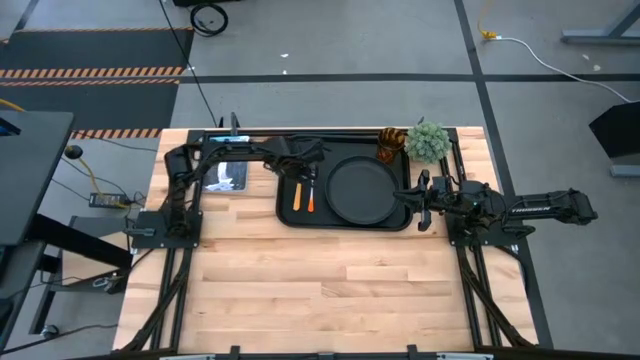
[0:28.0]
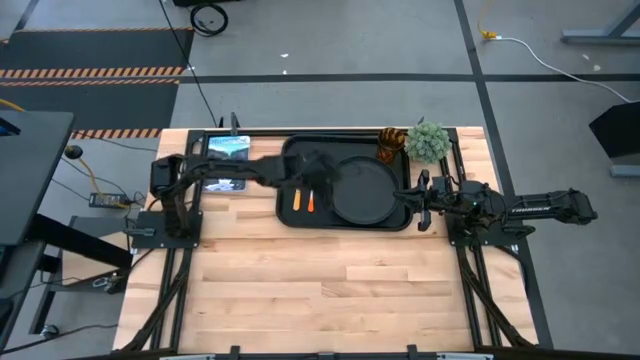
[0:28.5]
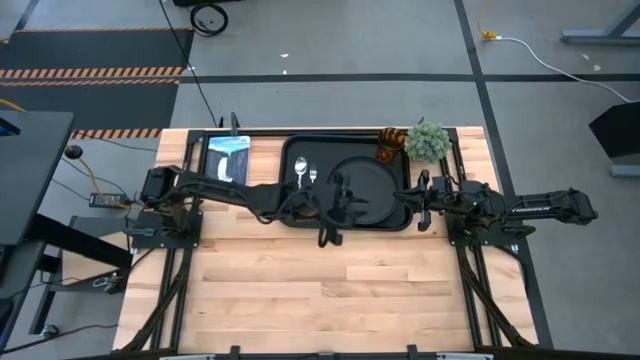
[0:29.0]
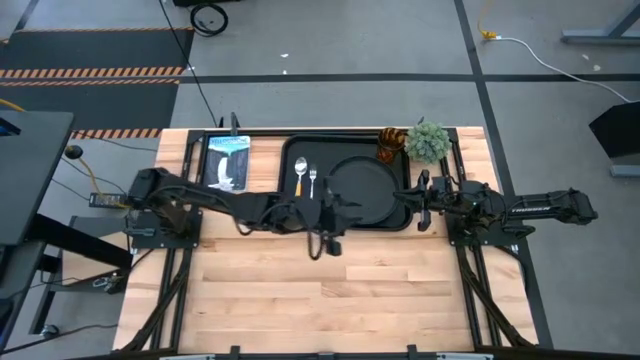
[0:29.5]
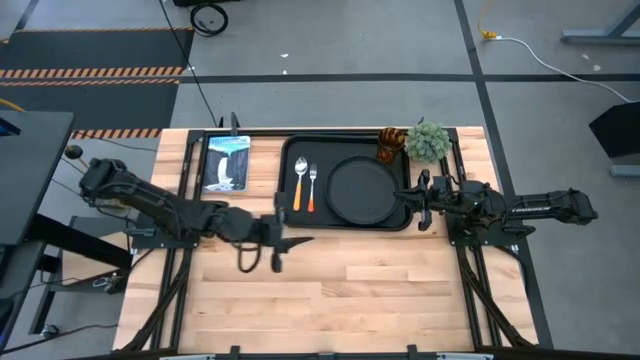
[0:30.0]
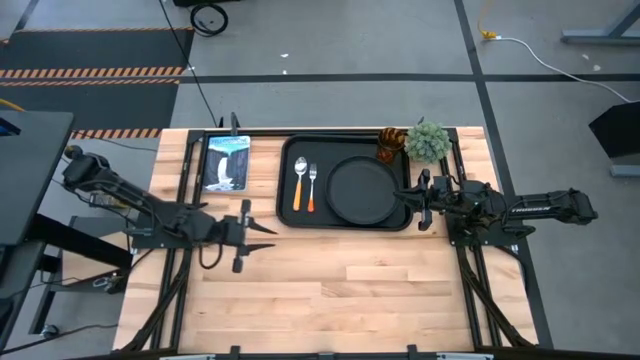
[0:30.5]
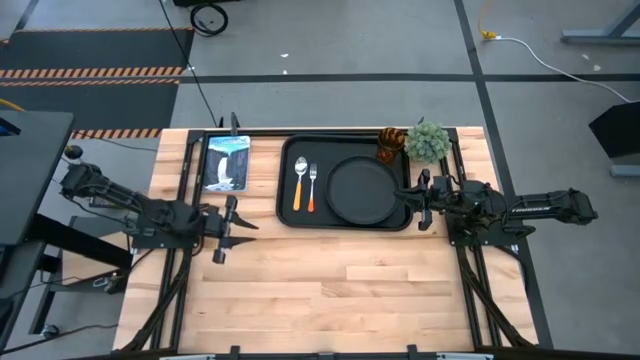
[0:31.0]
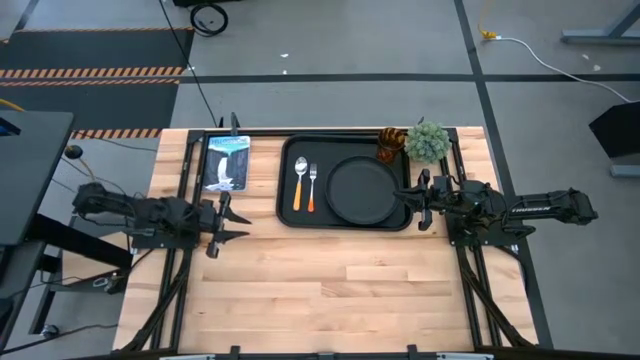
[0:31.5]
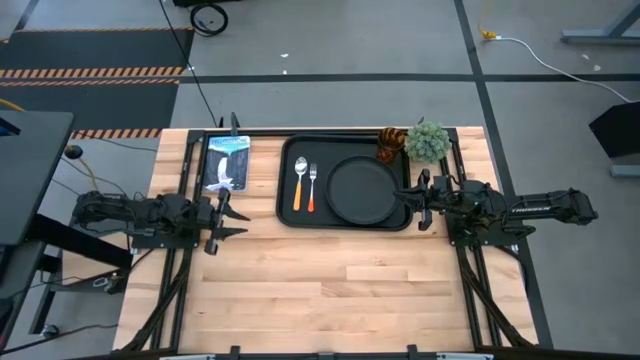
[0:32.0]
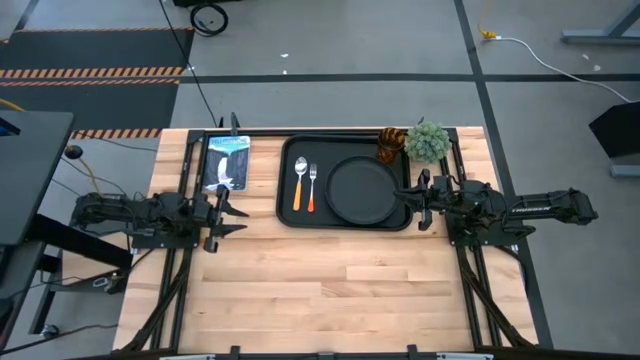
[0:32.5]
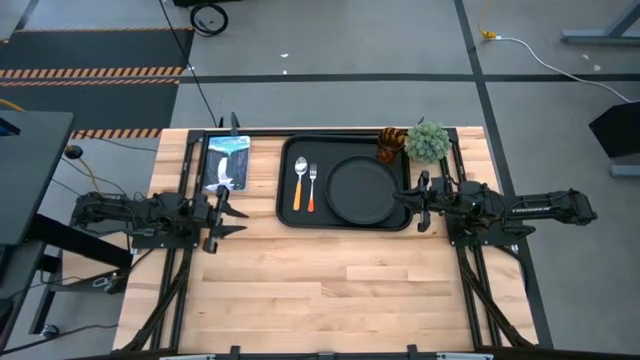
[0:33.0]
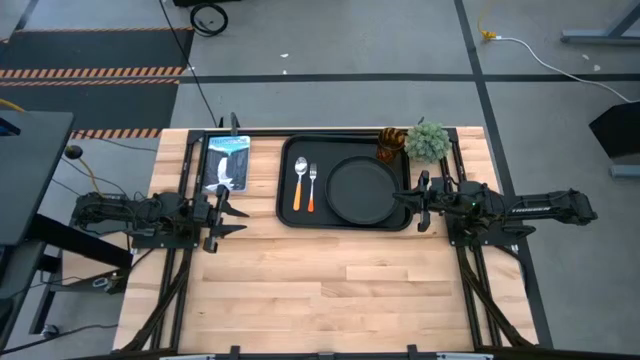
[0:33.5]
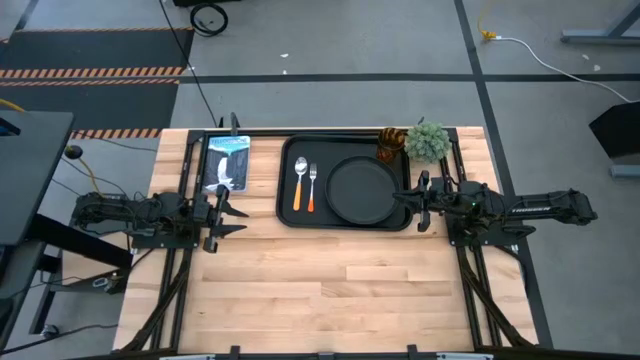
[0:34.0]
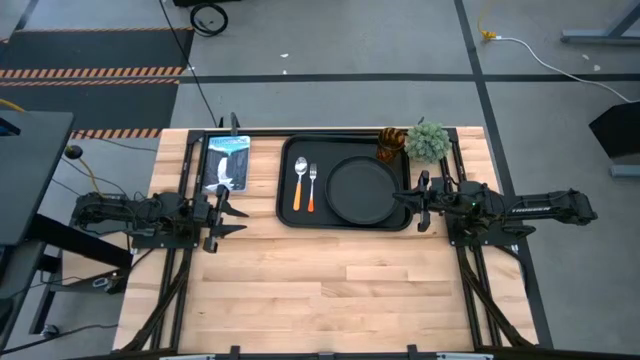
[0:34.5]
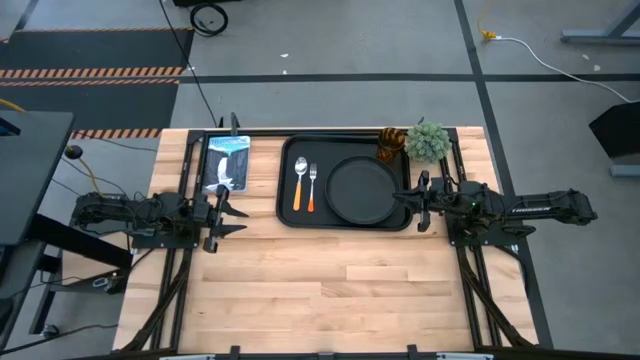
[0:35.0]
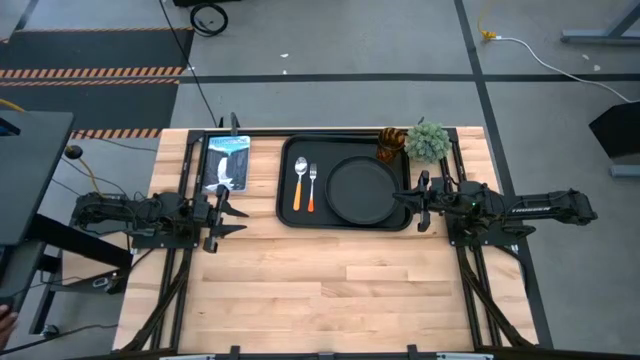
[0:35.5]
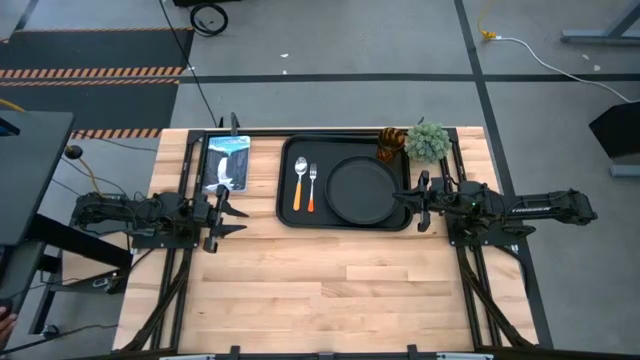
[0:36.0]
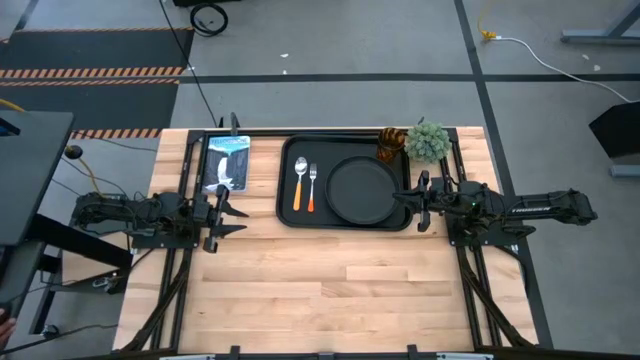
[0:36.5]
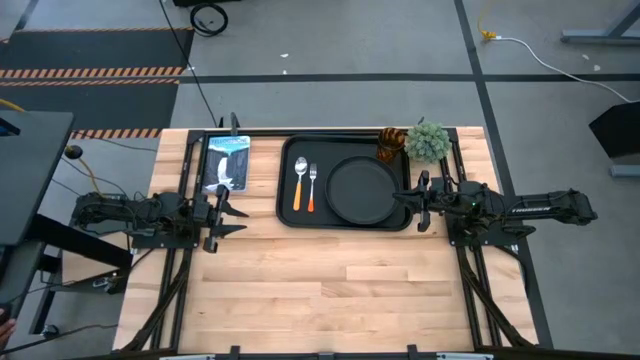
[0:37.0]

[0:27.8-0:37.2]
Task: Pick and place plate/cup/fork/spoon on tray
Return to Home Position

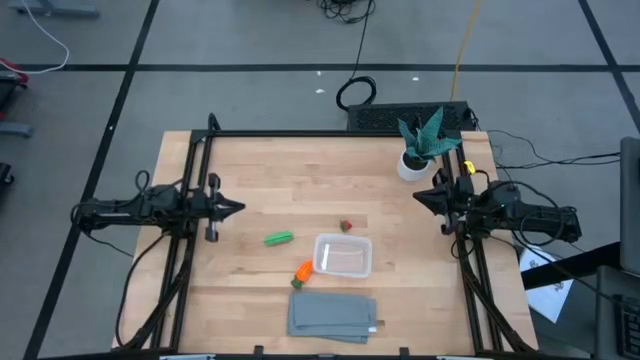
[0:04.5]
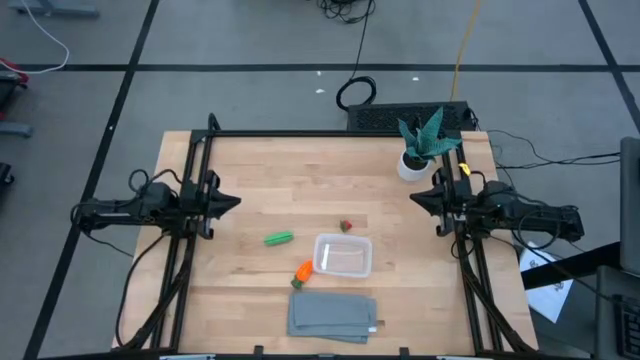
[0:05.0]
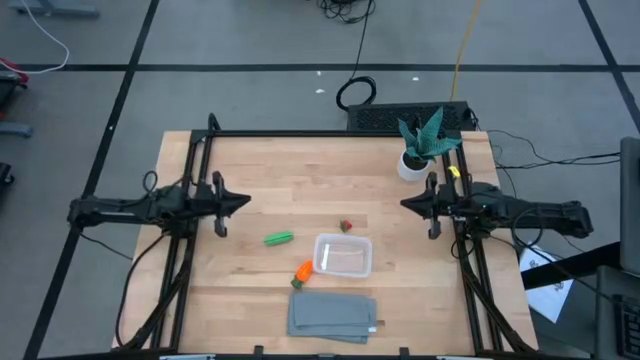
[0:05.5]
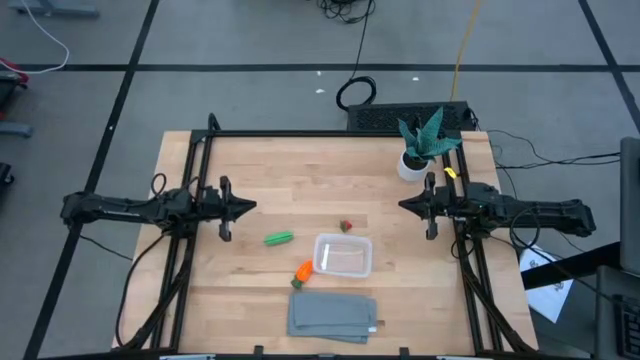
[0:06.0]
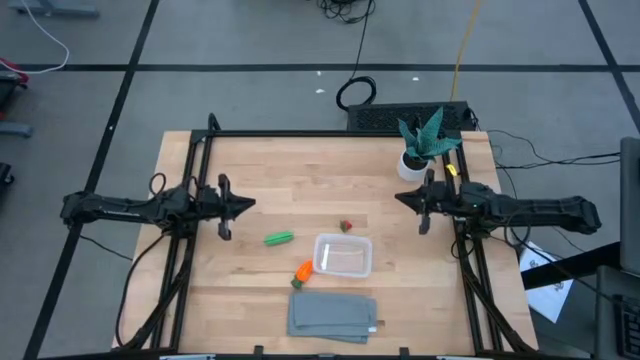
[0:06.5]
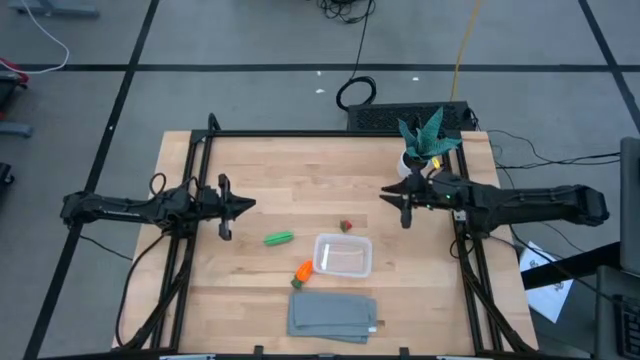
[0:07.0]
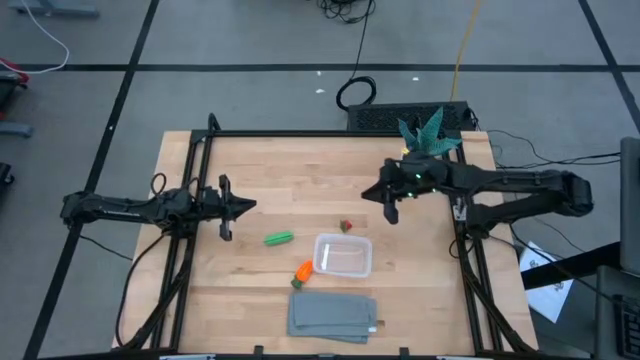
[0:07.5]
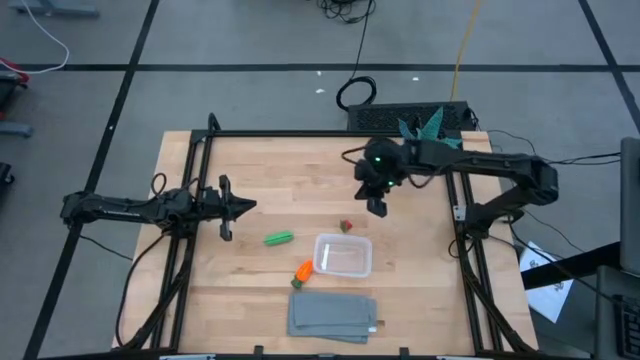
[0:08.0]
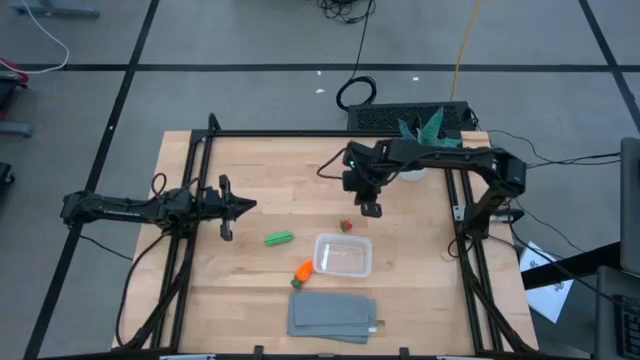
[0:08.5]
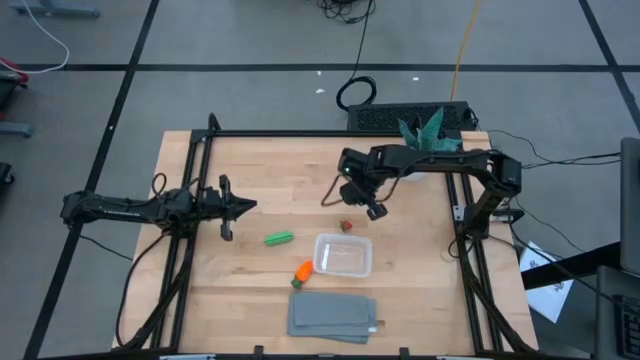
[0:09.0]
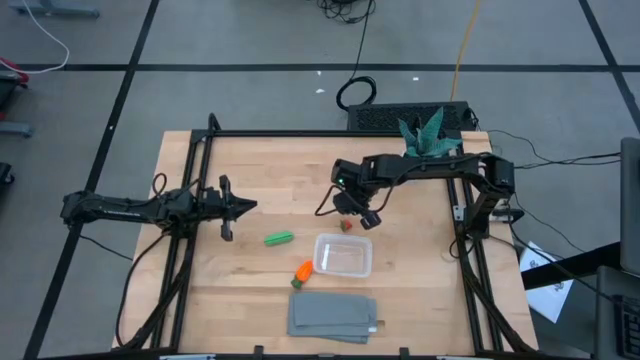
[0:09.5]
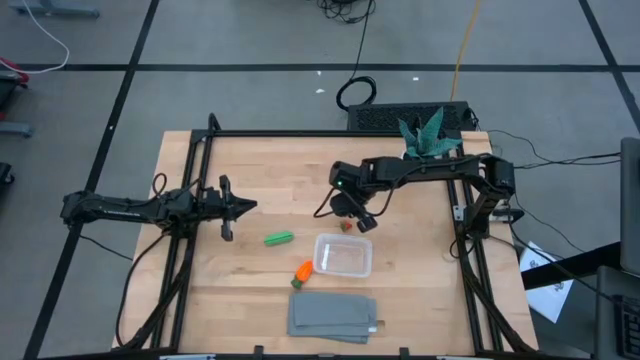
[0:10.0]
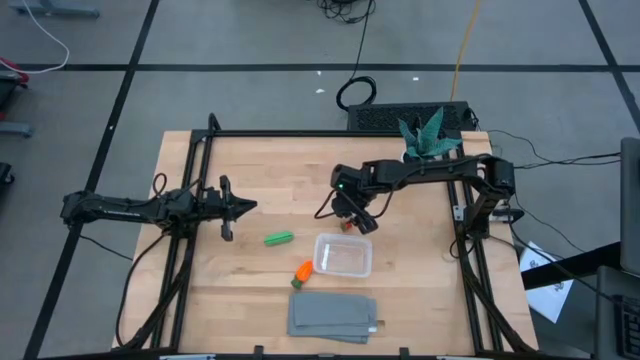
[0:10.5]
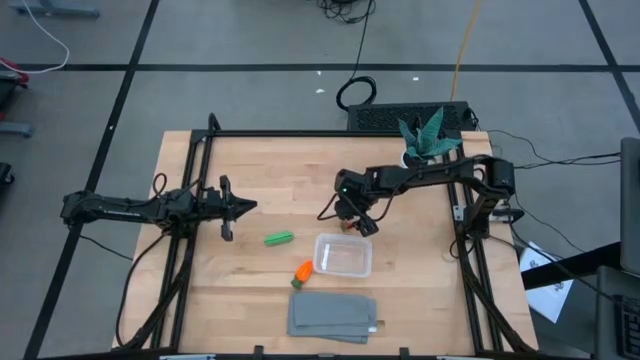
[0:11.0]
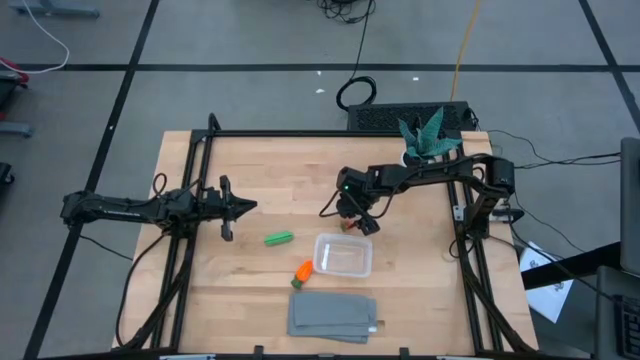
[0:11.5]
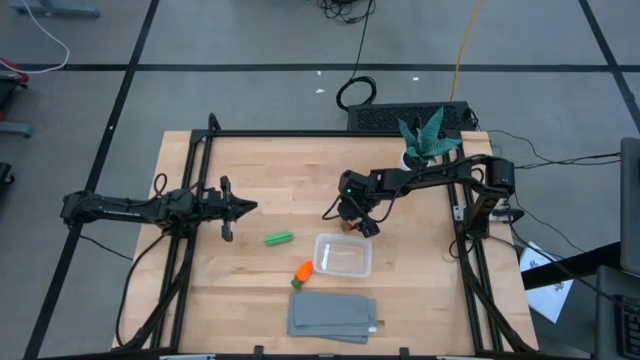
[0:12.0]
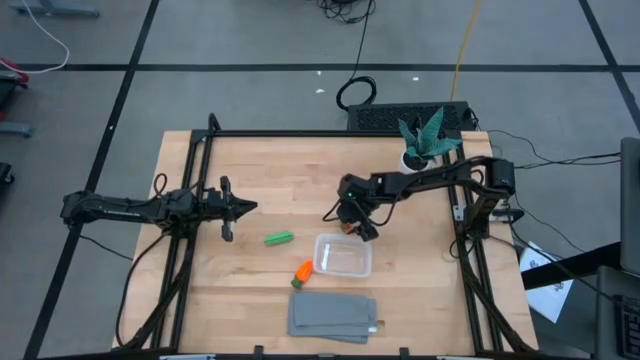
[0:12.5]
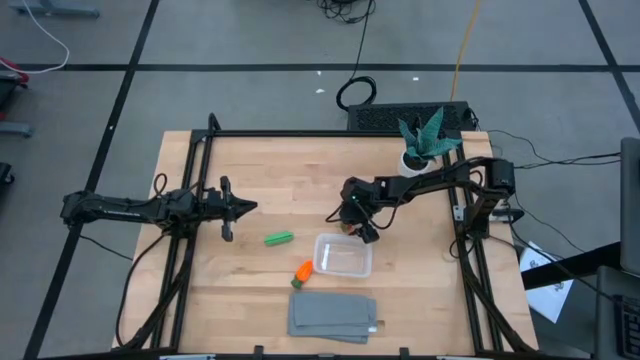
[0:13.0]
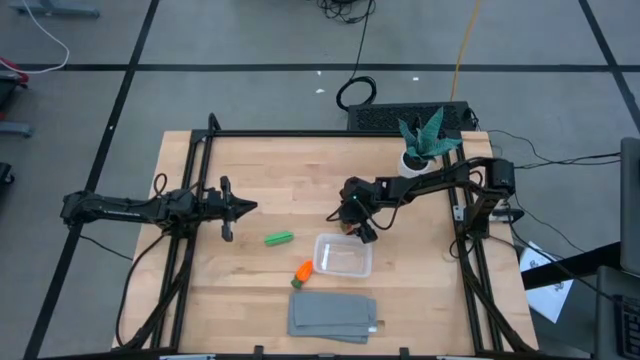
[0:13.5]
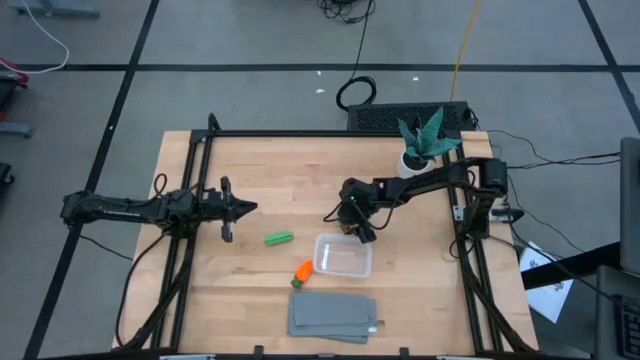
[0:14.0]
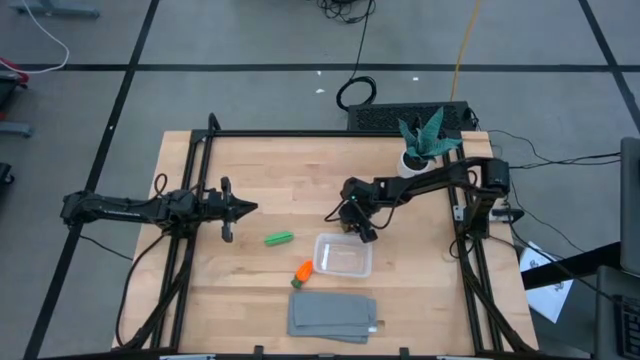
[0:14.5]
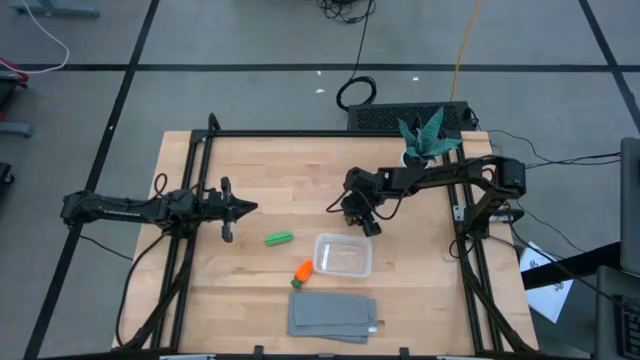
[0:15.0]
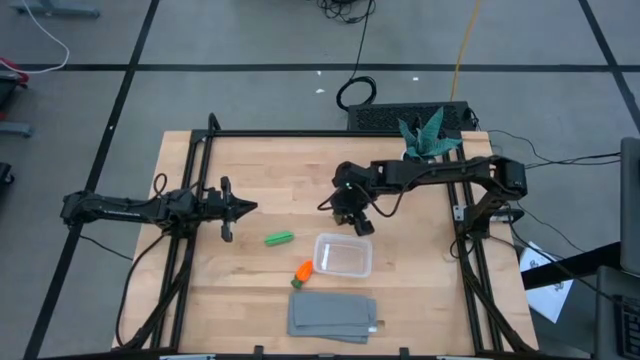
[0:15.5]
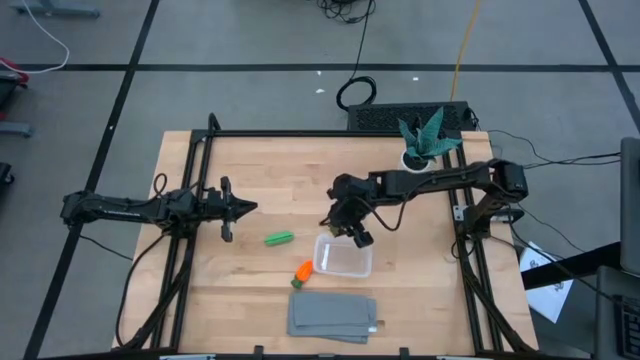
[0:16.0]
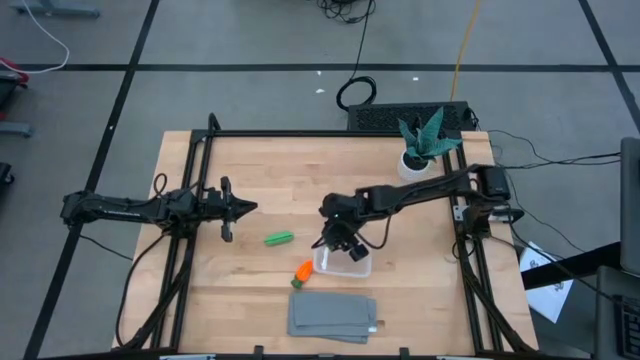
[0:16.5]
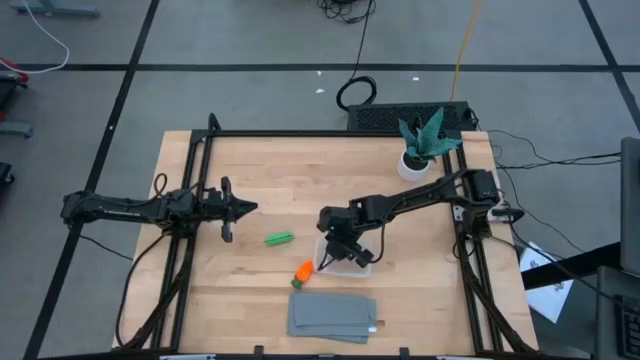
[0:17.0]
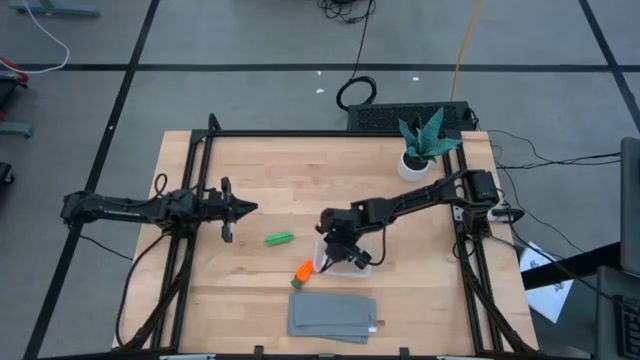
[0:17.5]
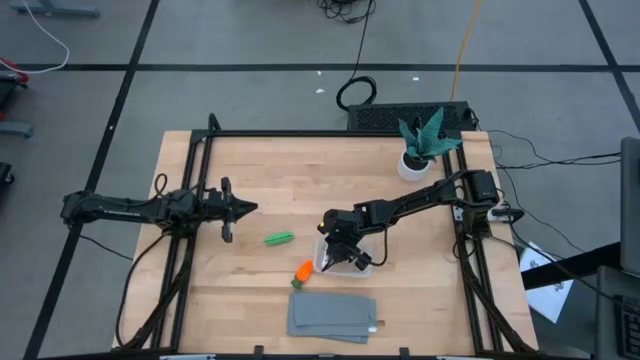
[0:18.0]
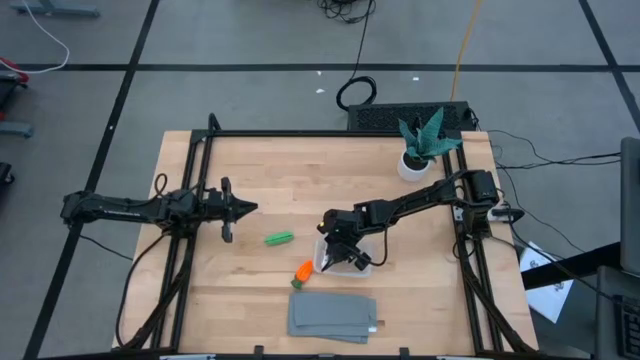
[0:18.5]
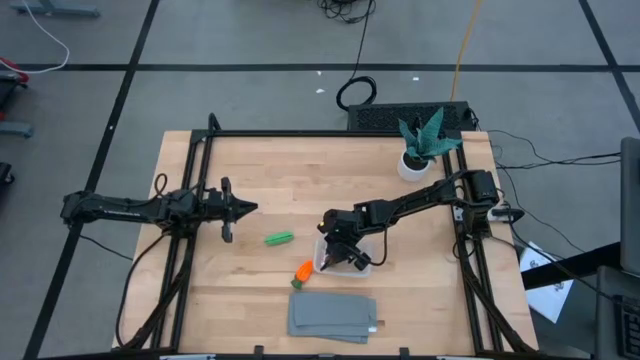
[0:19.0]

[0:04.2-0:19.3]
Task: Pick and placing Produce into tupperware
Put the red strawberry into the transparent bin
